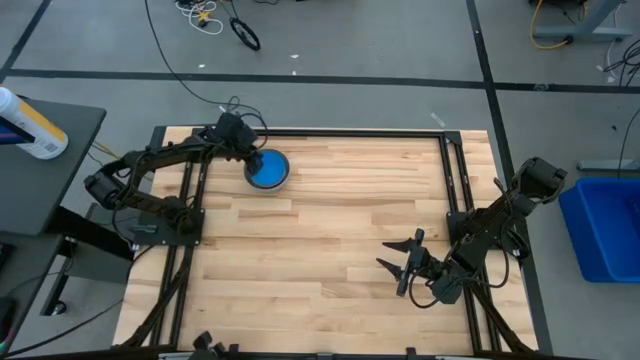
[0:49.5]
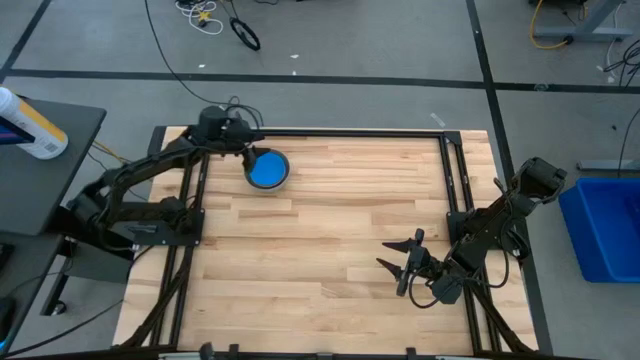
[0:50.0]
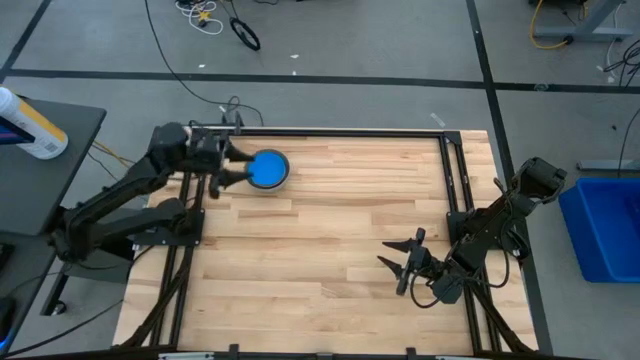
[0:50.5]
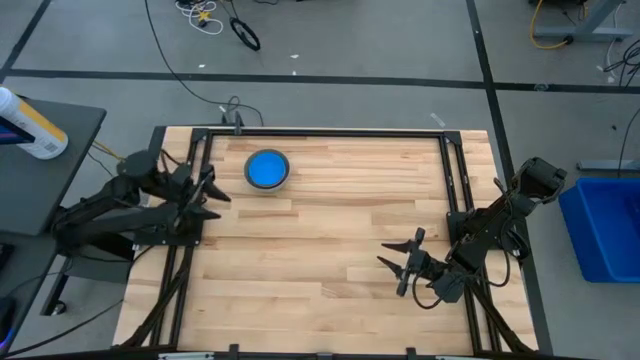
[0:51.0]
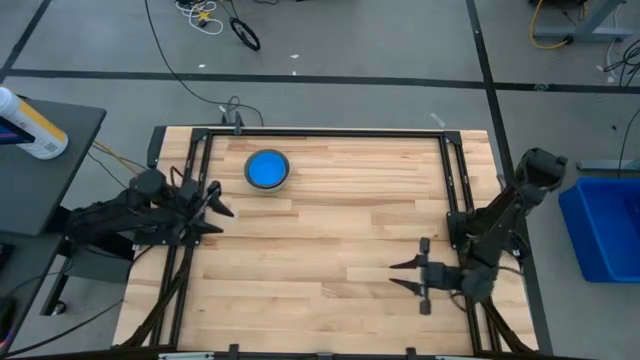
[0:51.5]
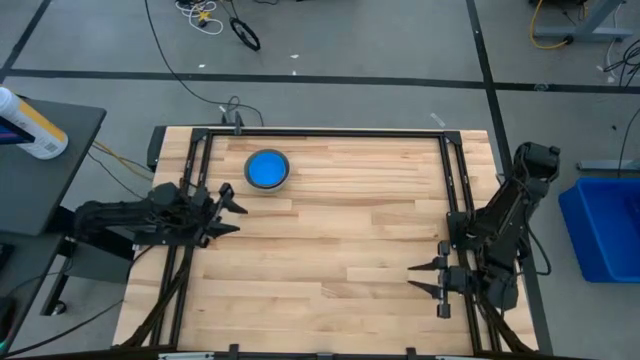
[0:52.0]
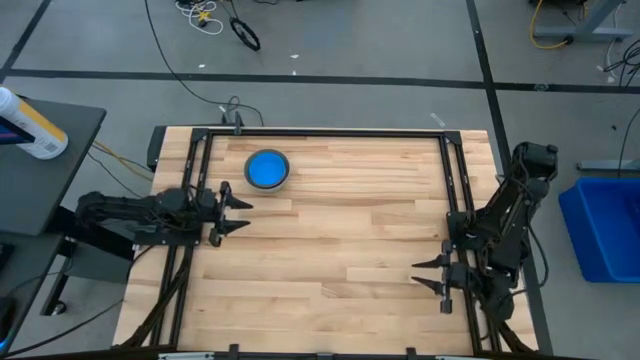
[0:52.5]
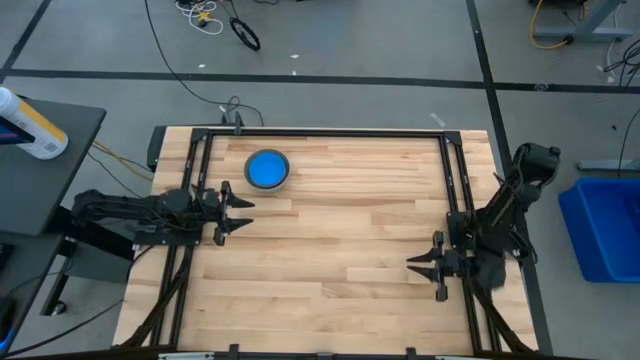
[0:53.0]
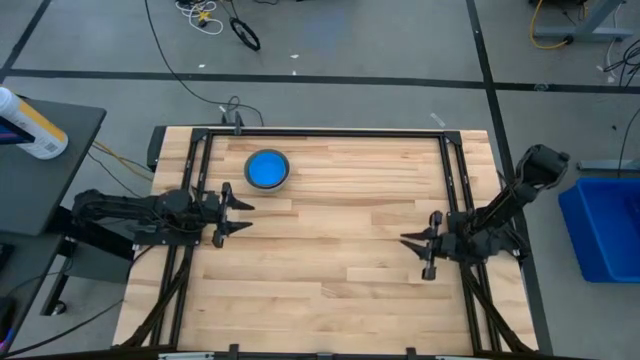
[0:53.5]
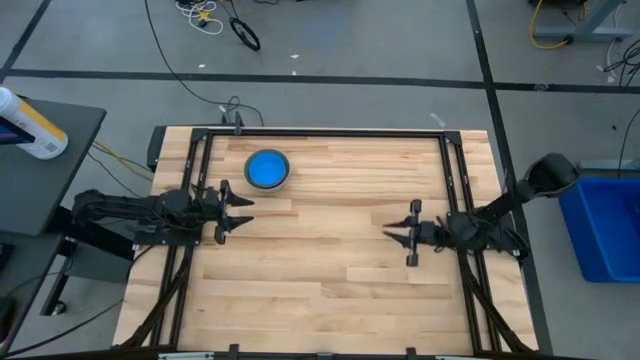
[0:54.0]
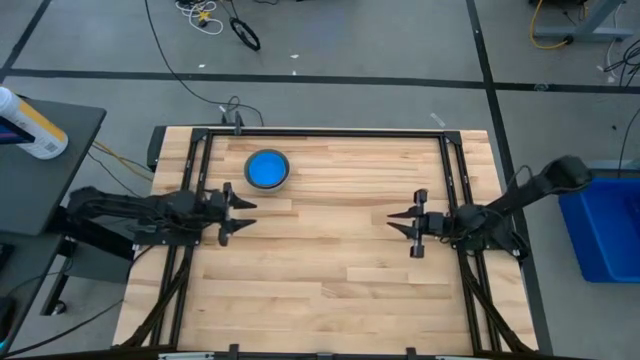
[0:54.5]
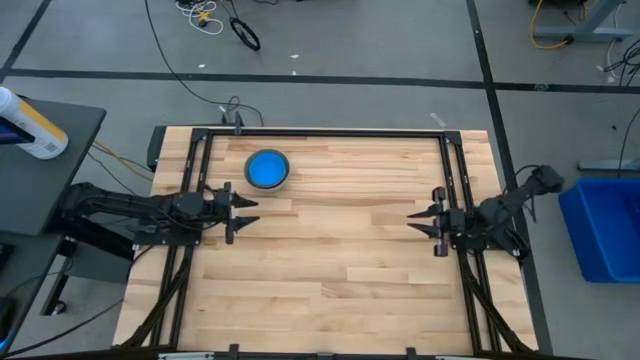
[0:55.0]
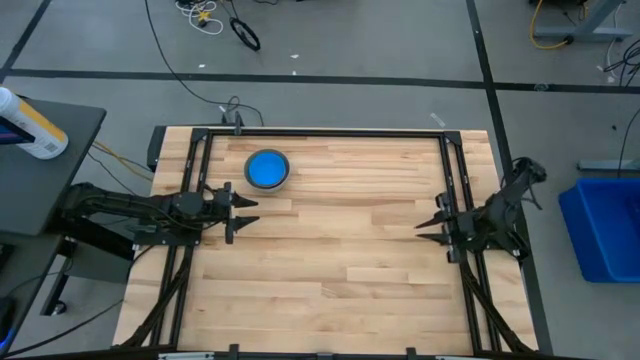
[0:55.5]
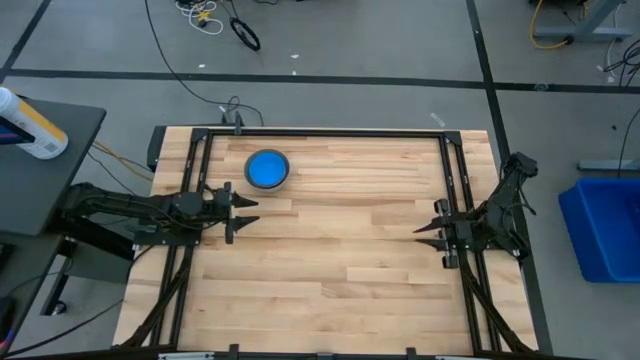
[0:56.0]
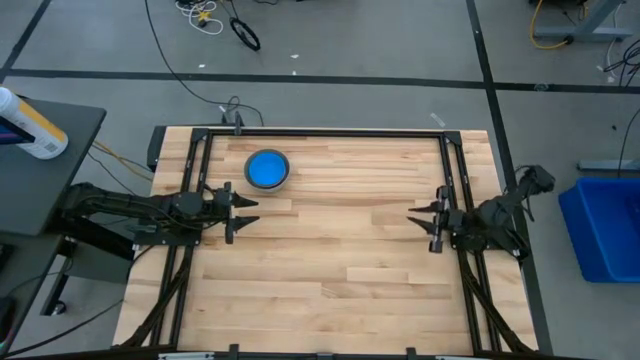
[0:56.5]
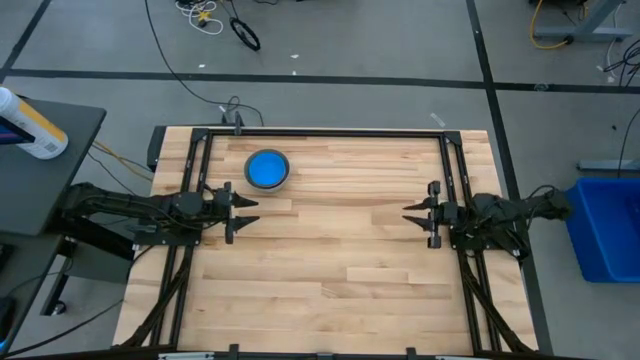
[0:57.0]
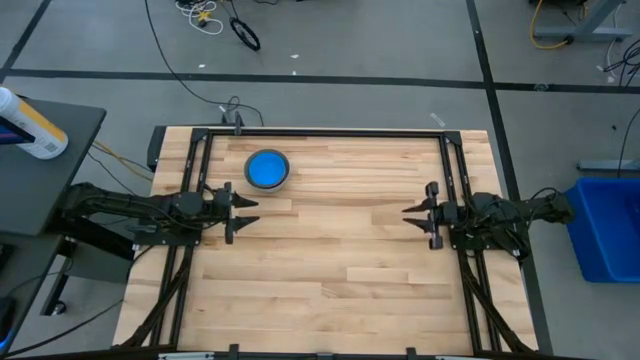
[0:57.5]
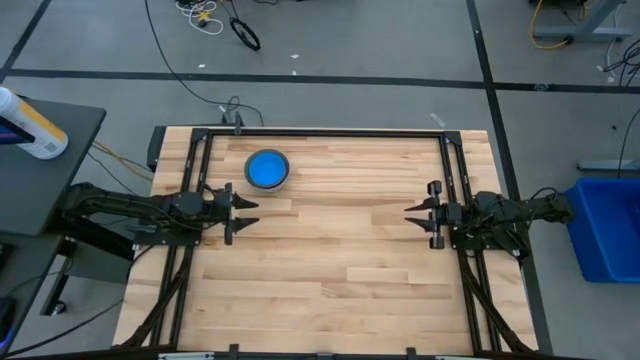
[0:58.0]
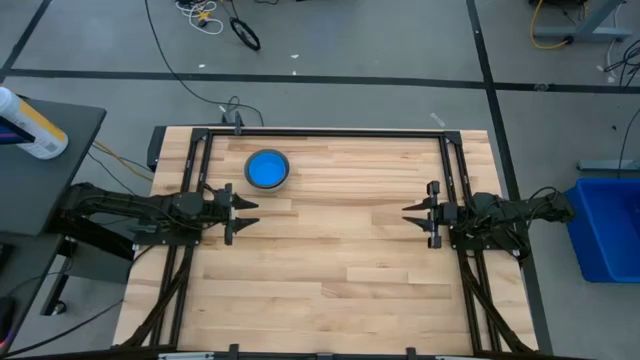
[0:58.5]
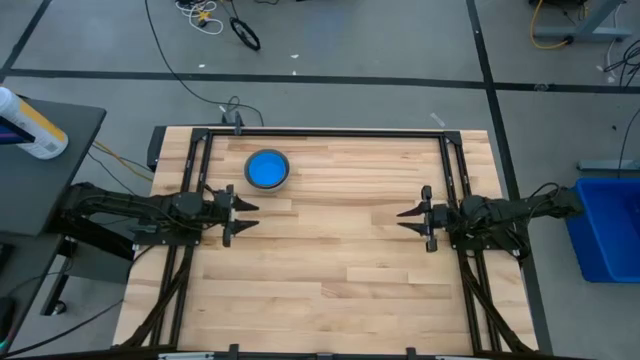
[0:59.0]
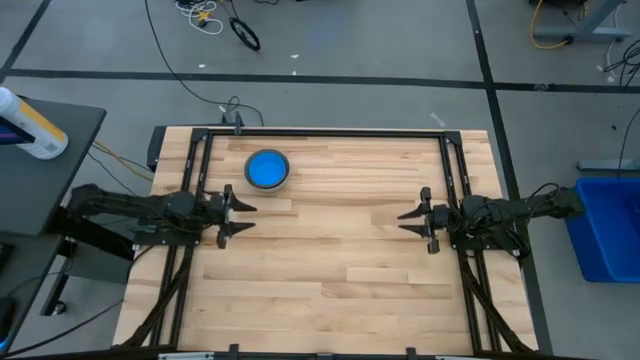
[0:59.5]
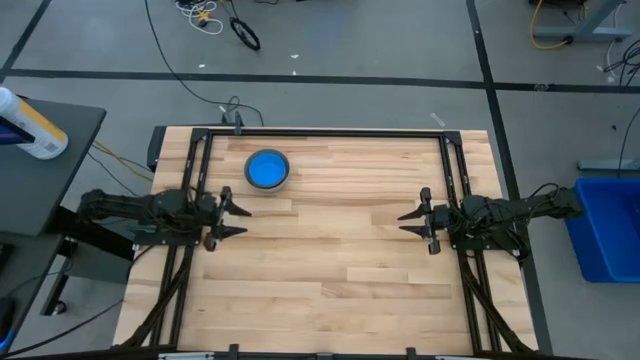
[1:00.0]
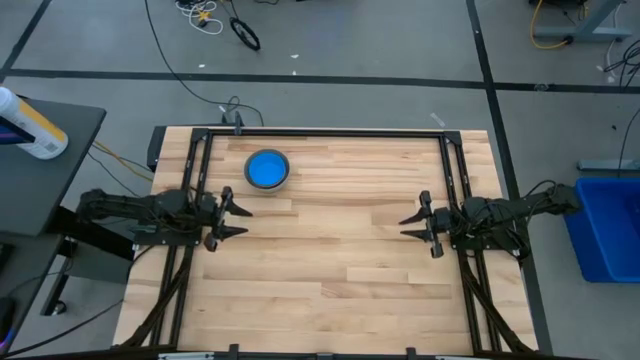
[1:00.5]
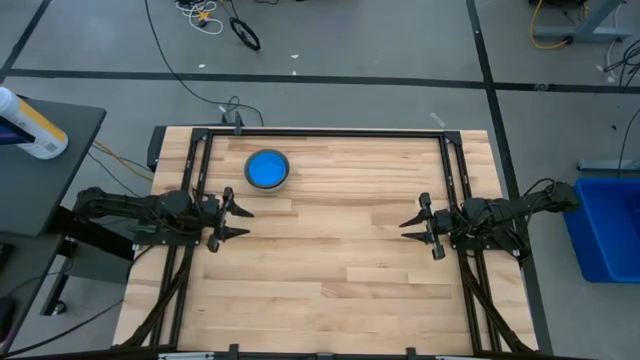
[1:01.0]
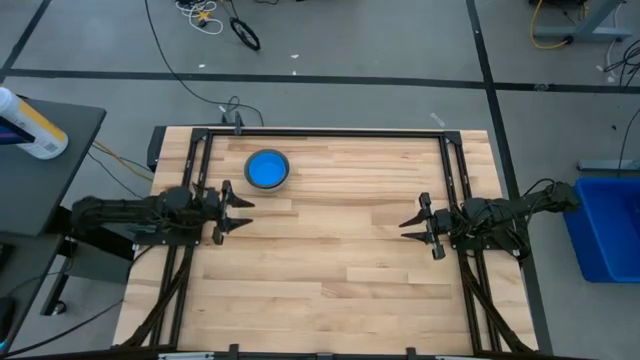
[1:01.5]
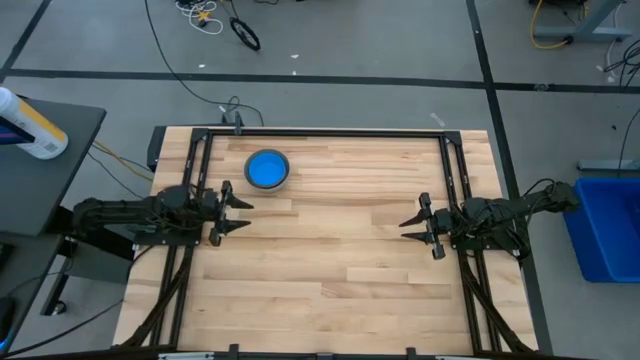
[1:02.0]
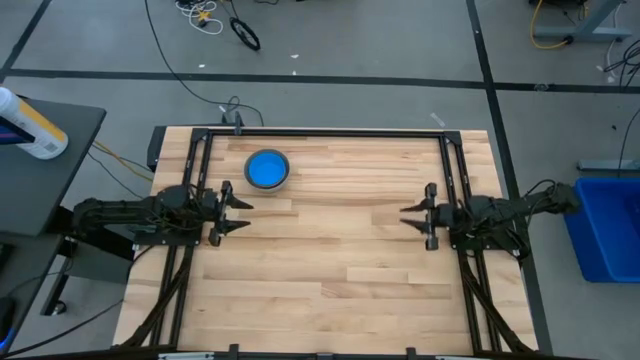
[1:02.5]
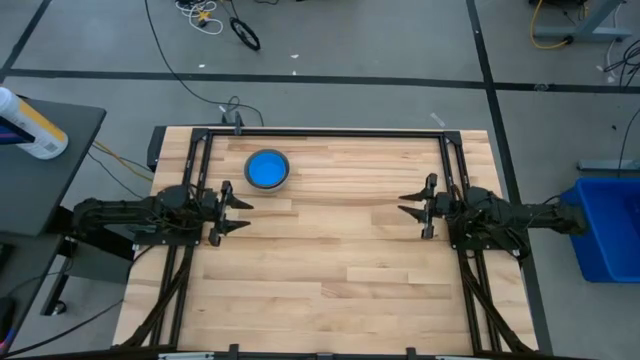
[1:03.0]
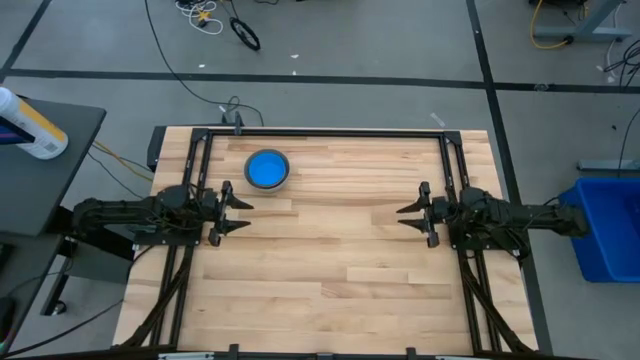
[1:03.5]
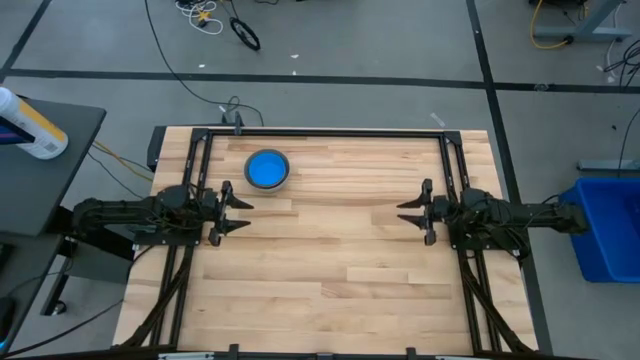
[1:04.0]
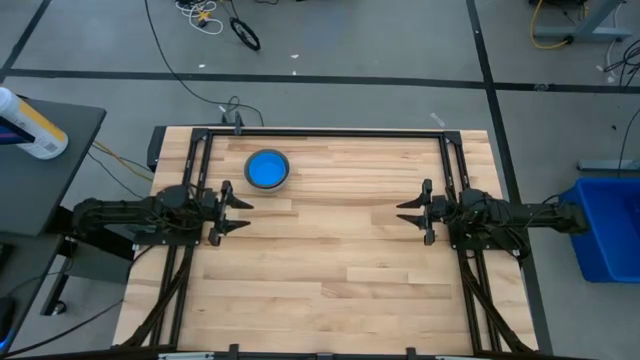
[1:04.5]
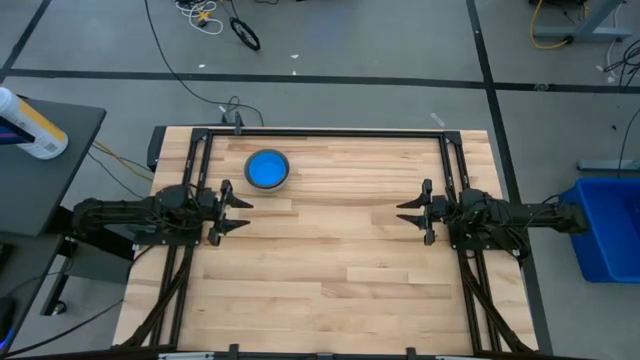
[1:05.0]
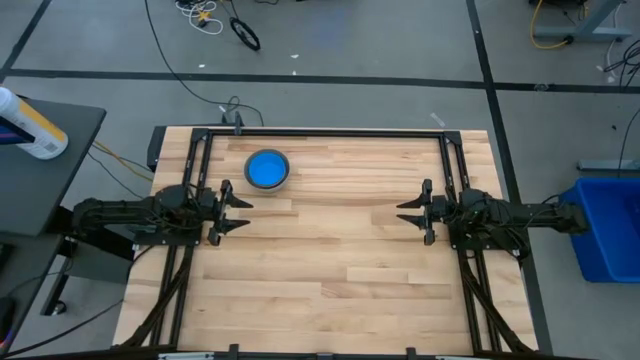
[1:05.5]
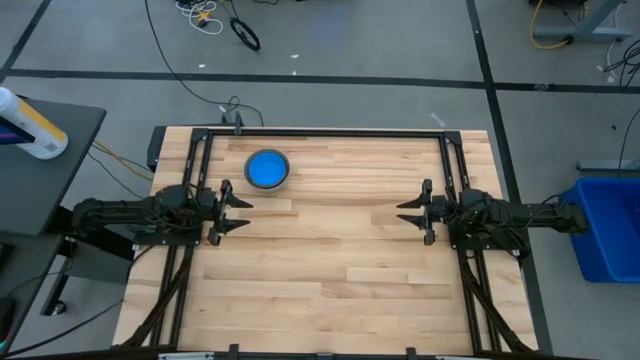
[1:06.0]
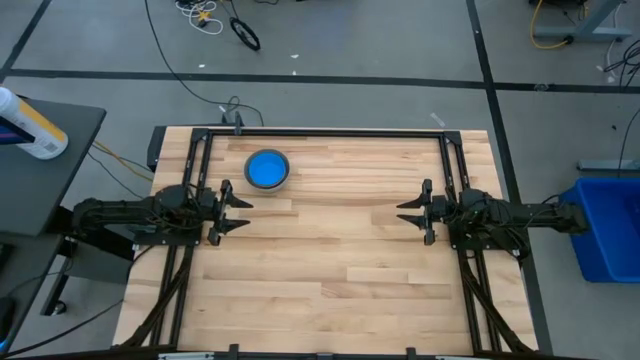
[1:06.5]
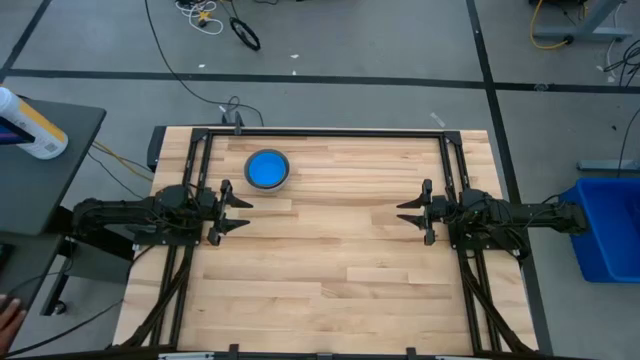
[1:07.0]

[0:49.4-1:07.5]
Return to Home Position
